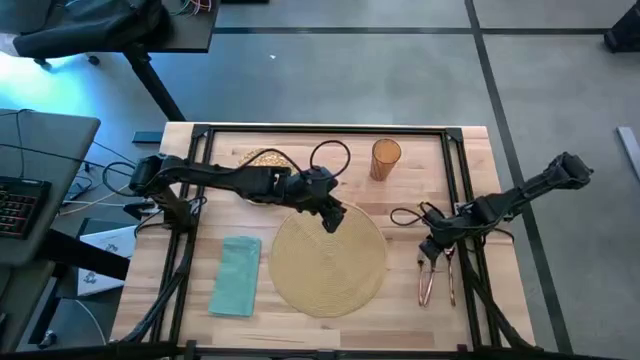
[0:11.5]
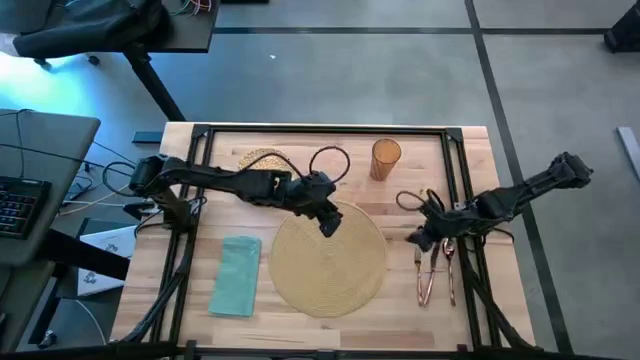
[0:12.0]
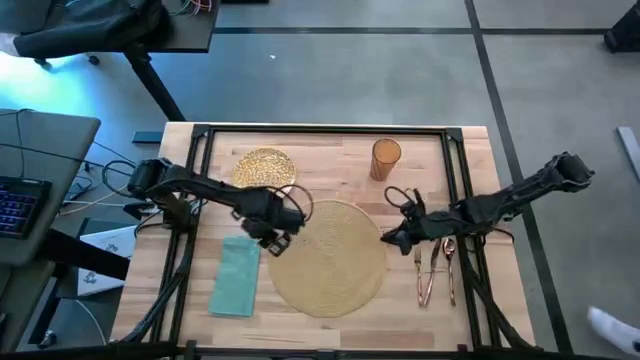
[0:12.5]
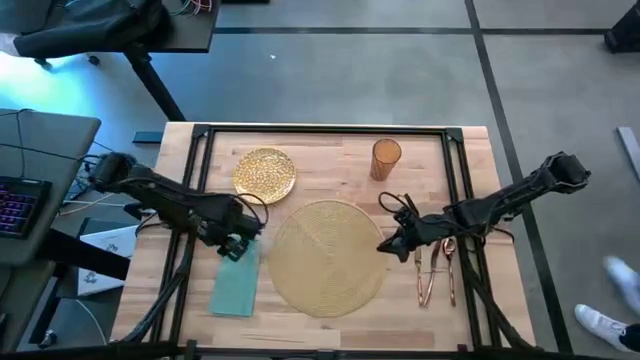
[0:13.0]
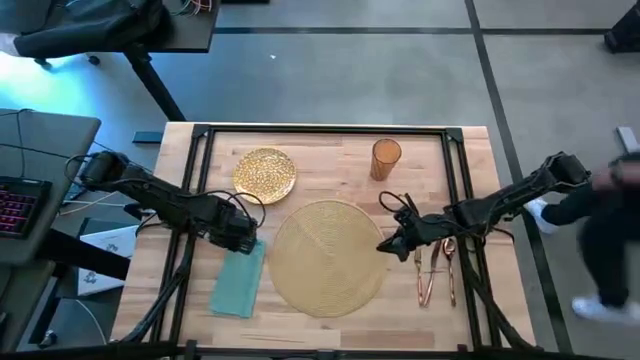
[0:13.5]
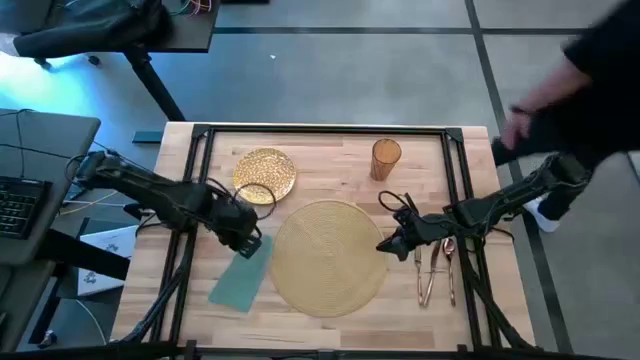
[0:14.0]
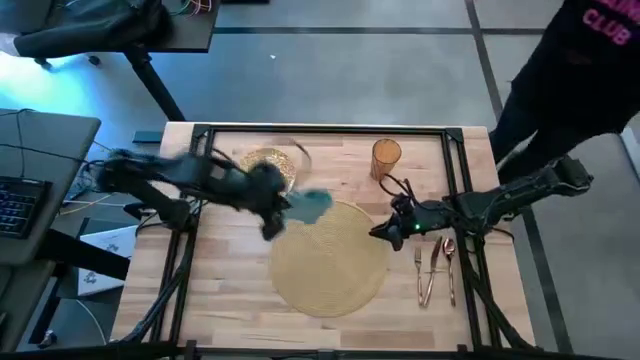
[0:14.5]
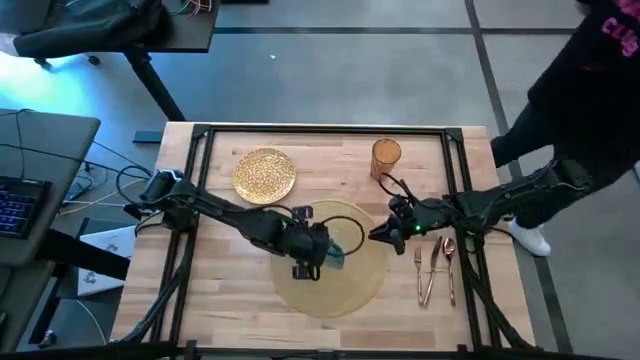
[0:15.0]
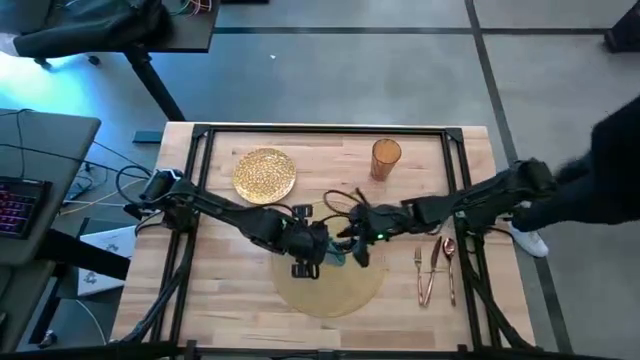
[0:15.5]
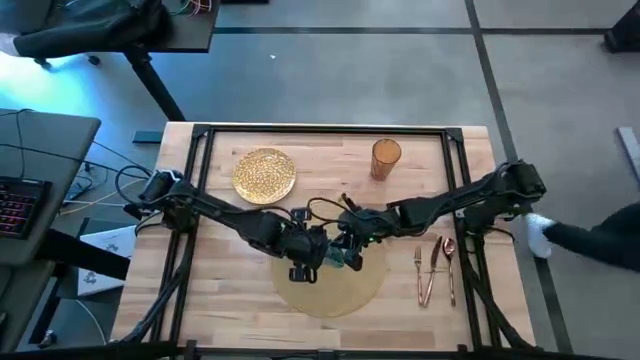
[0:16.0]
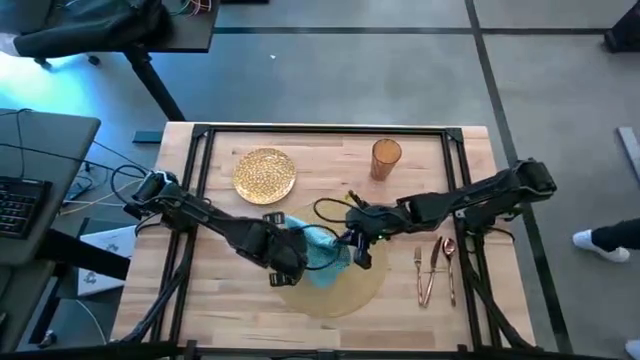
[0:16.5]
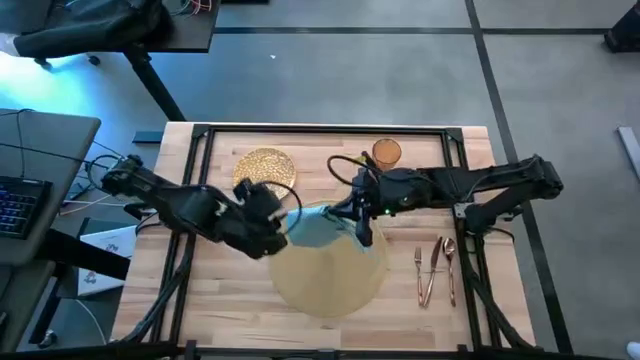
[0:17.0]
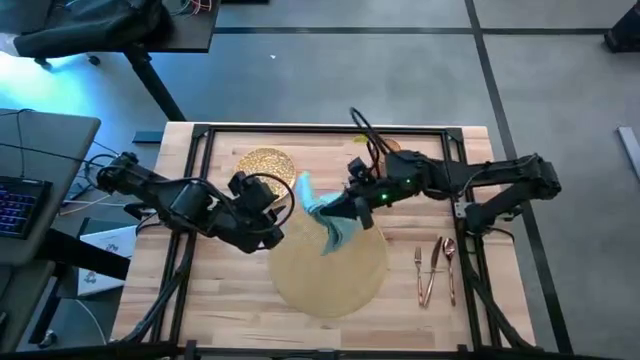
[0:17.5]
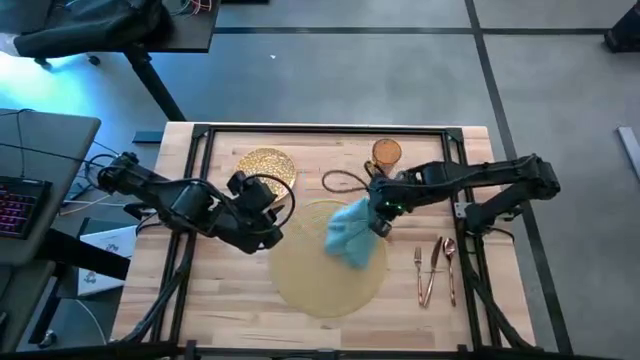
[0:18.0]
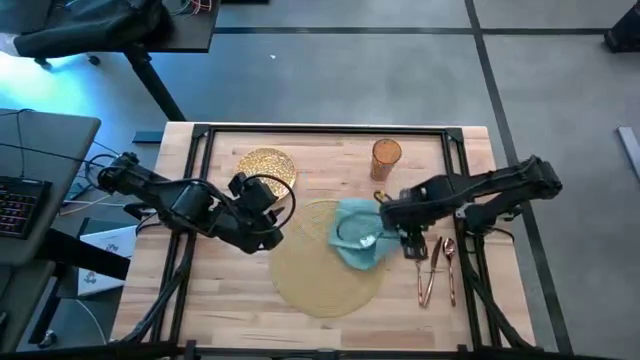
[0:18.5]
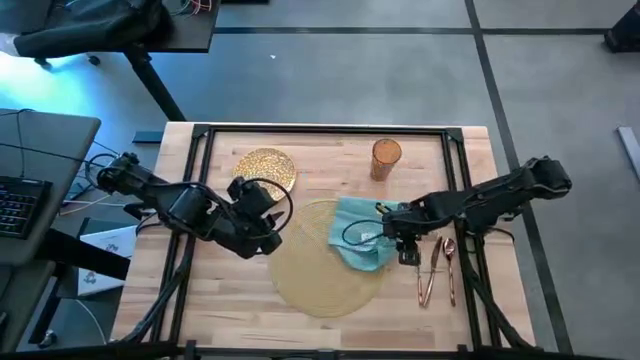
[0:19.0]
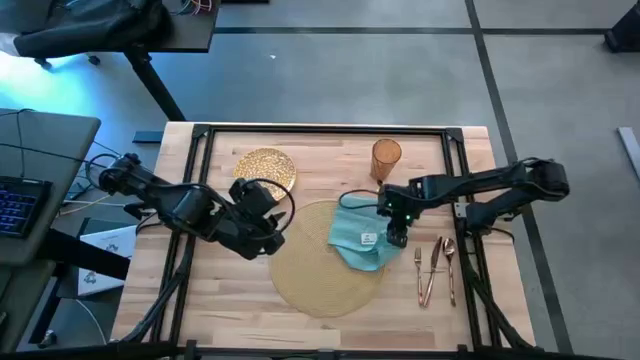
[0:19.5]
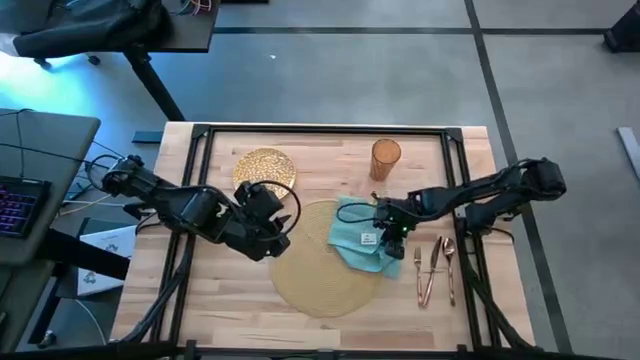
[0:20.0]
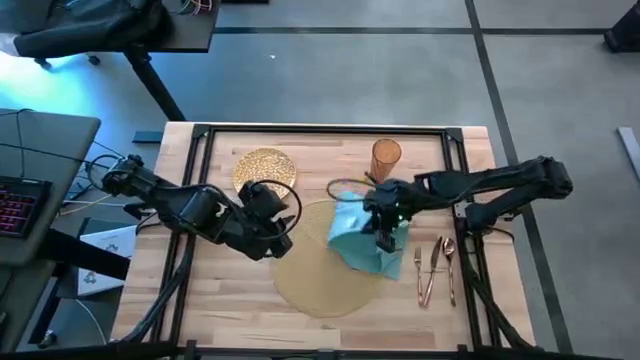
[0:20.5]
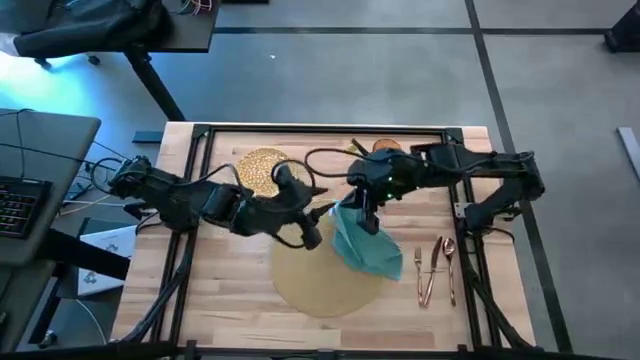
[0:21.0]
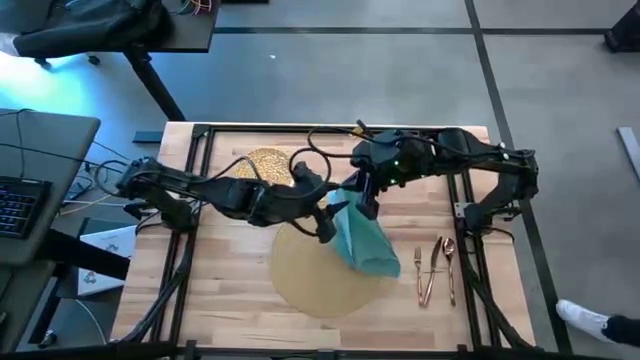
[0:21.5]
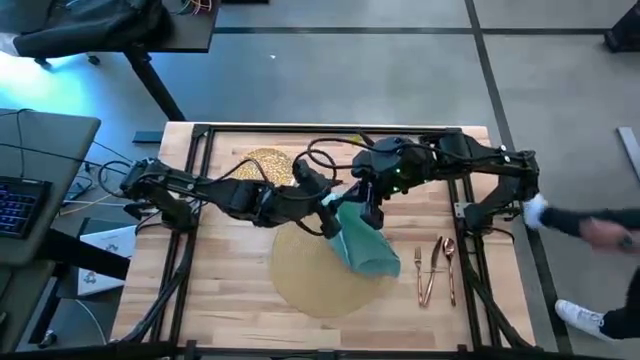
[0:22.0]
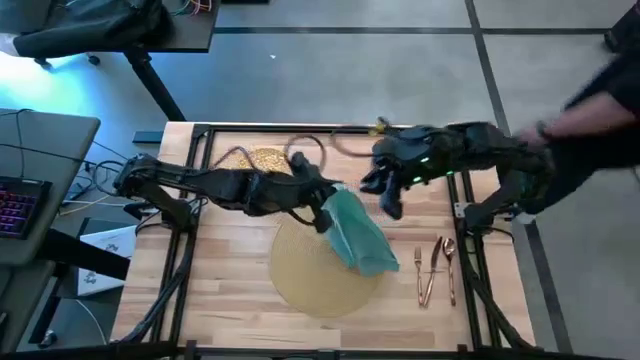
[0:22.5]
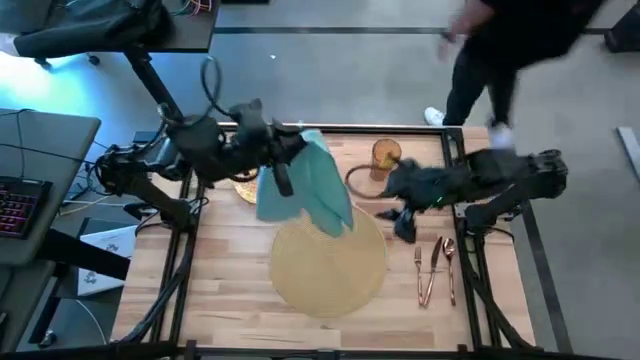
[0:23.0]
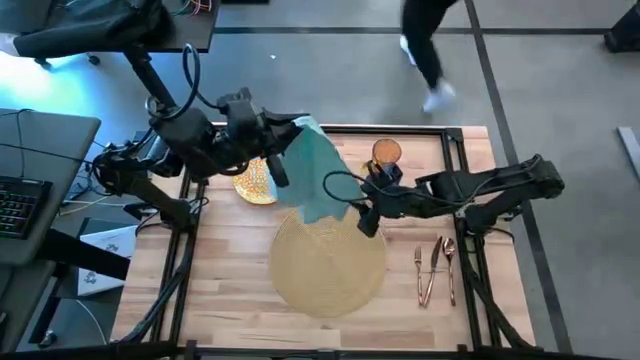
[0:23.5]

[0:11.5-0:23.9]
Task: Set table place
Fold the blue napkin

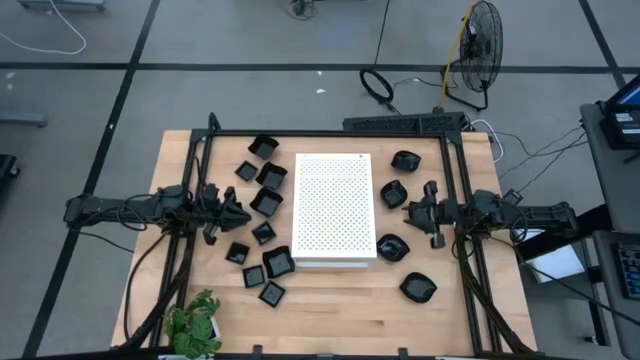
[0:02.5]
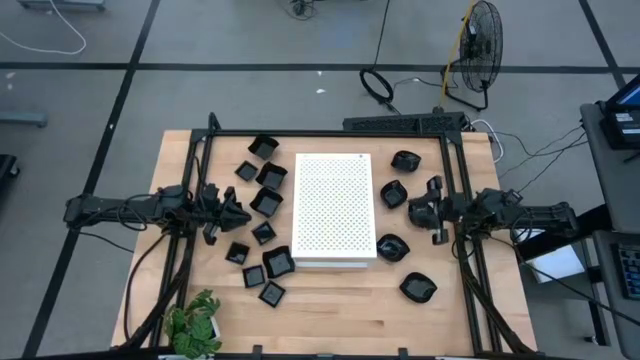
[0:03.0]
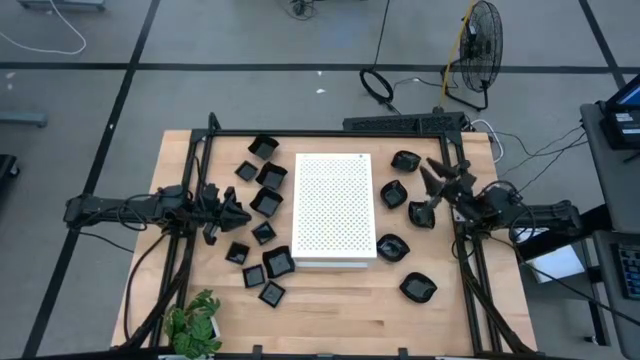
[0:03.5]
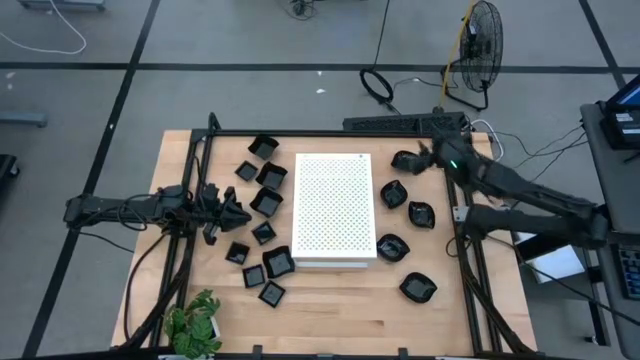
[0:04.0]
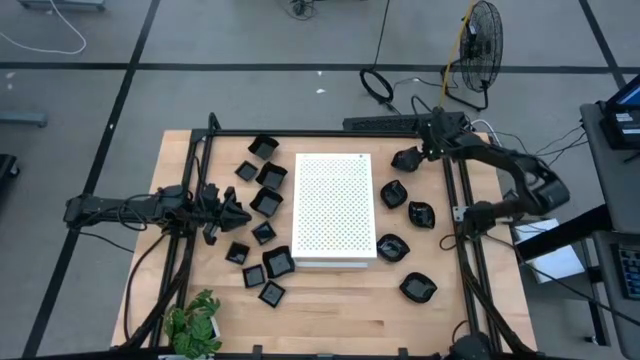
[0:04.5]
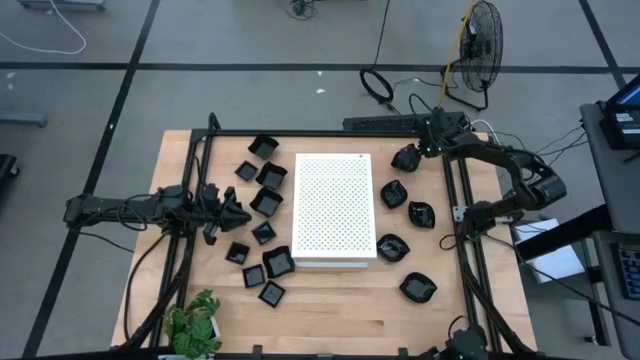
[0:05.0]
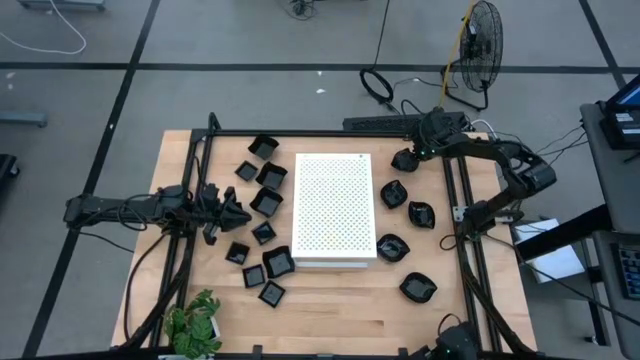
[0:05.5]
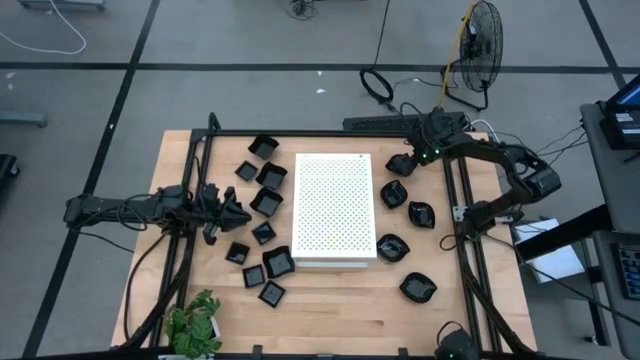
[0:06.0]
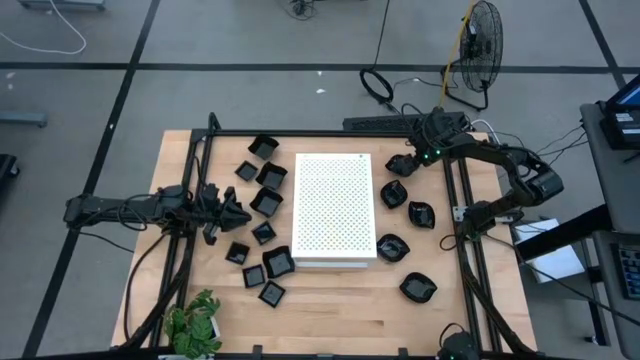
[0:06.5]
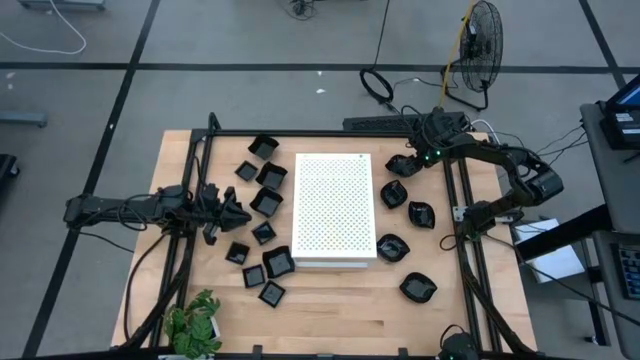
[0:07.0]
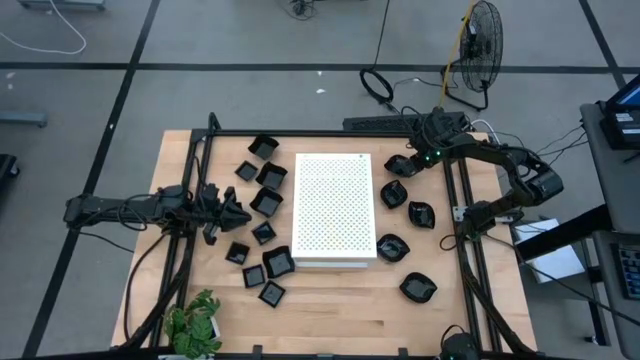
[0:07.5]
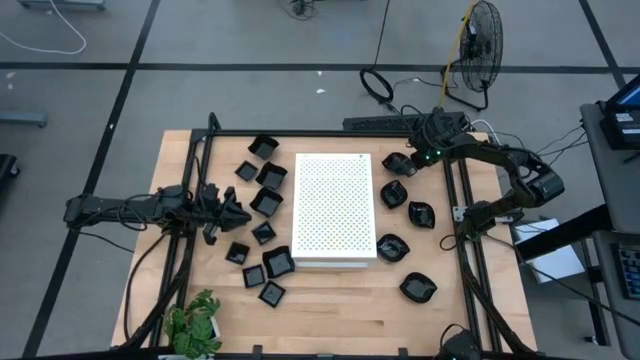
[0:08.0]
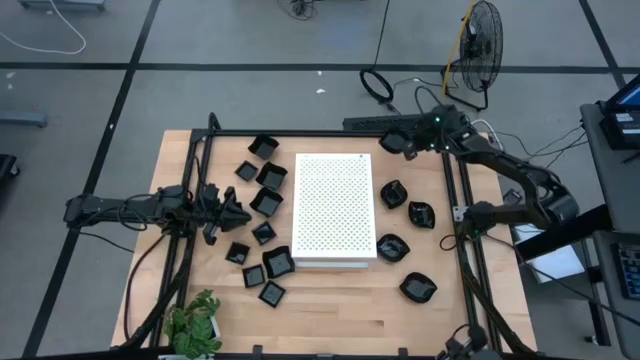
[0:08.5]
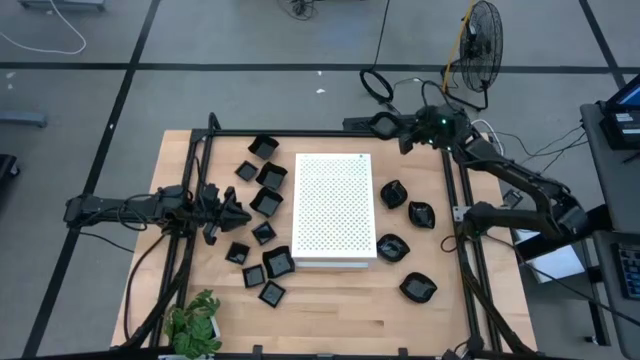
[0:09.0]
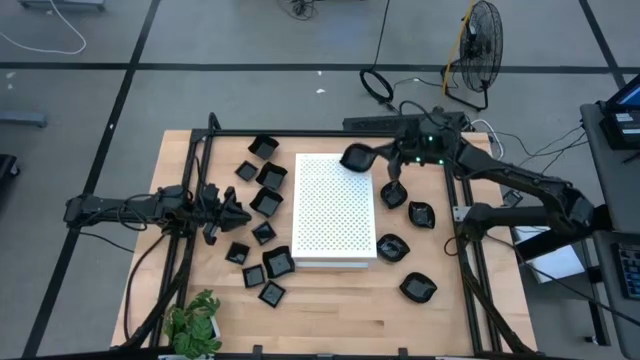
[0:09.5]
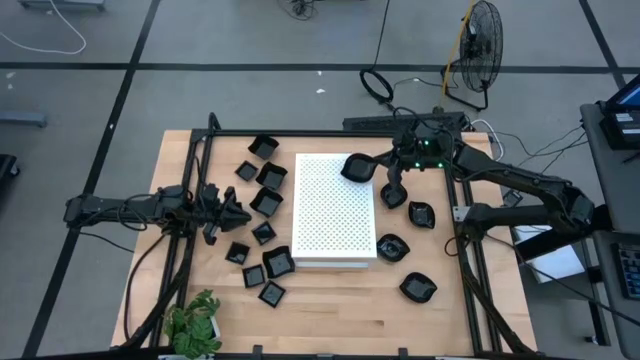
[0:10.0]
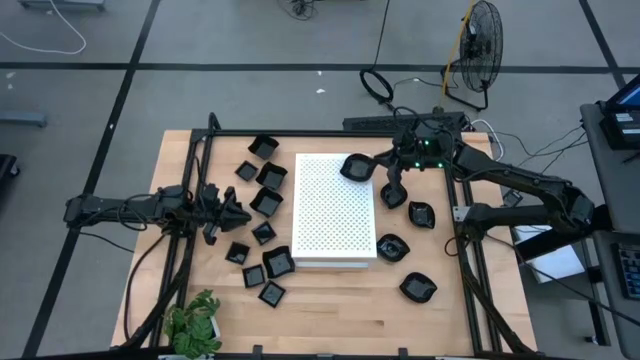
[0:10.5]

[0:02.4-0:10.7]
Task: Pick & Place Mini shaped plates
Put the black leaf-shaped plate on the shelf
